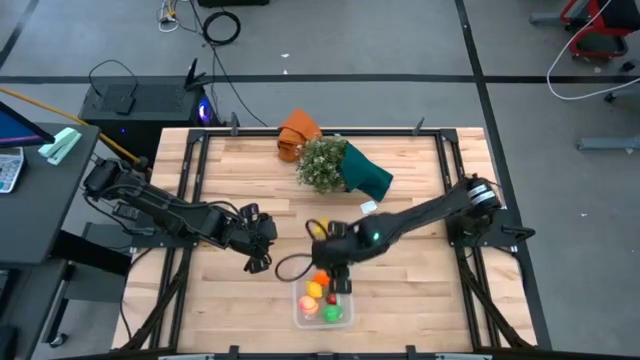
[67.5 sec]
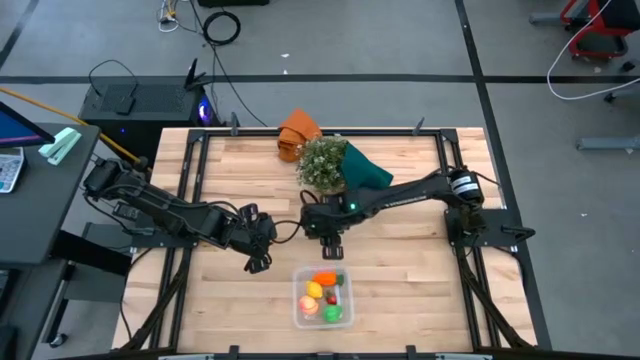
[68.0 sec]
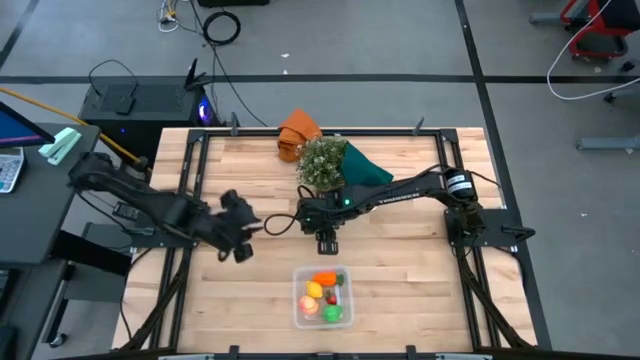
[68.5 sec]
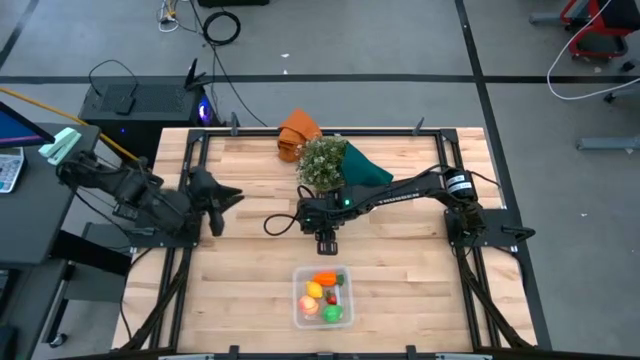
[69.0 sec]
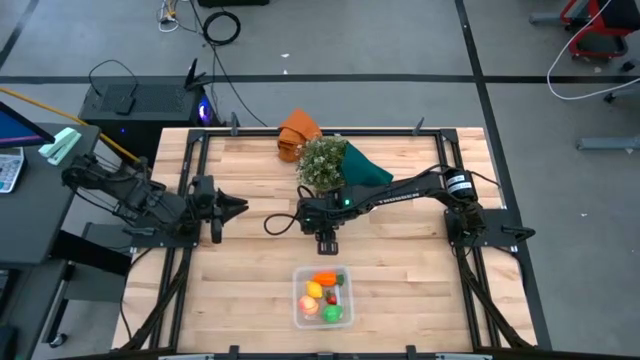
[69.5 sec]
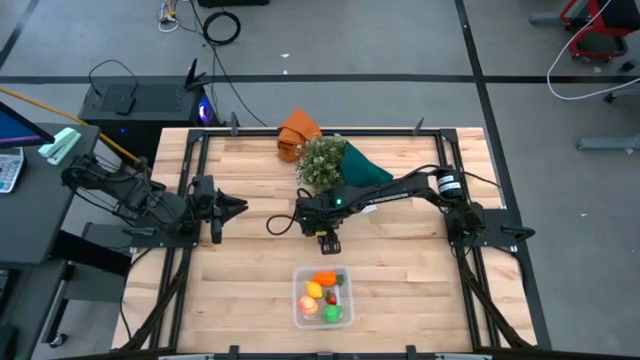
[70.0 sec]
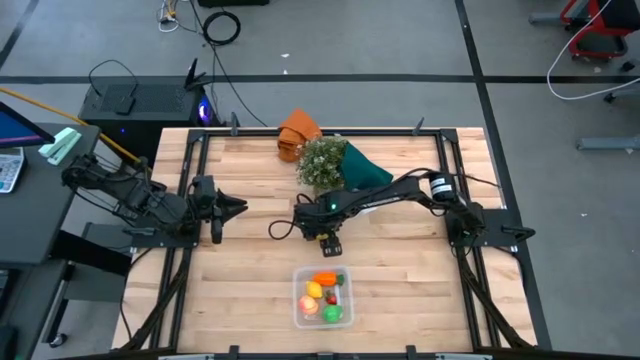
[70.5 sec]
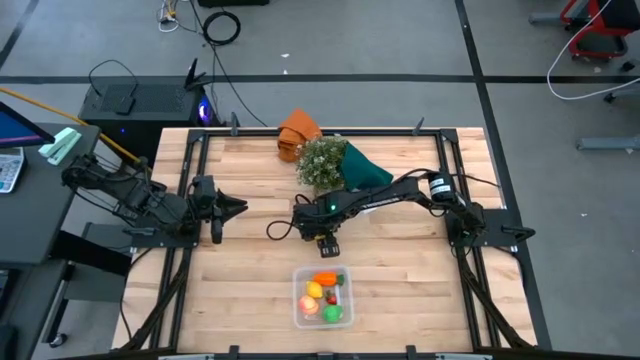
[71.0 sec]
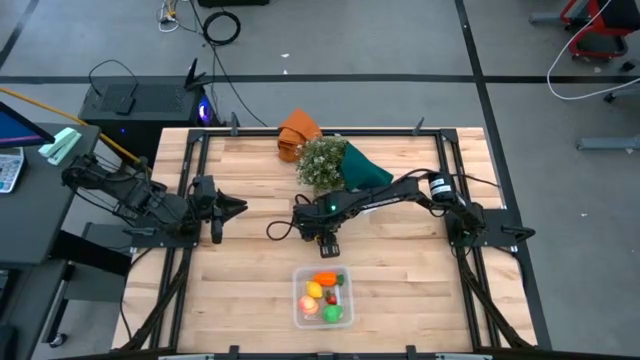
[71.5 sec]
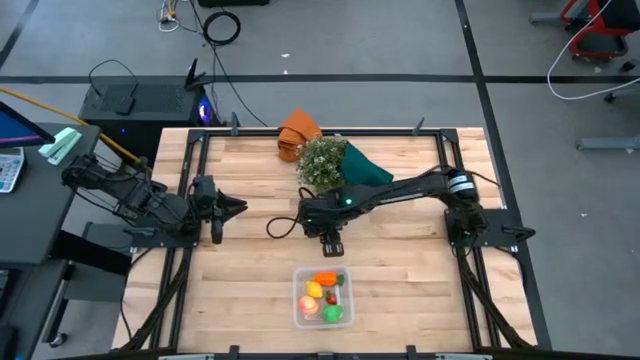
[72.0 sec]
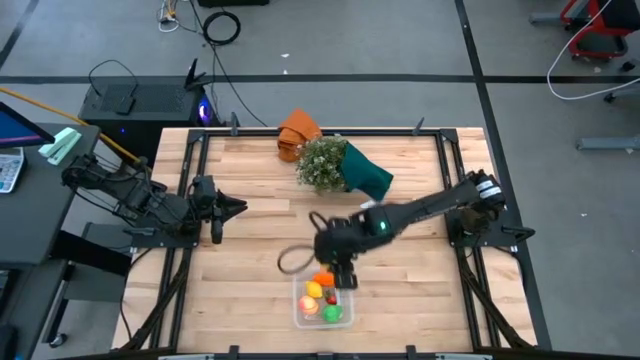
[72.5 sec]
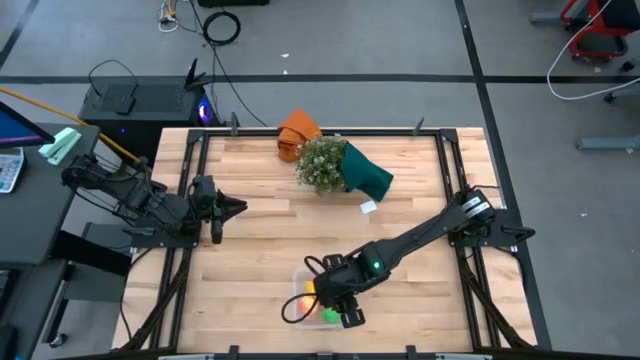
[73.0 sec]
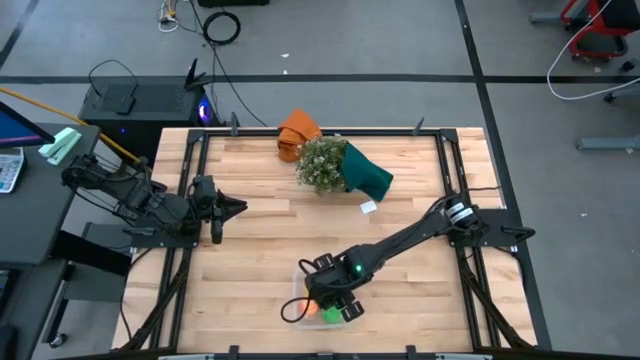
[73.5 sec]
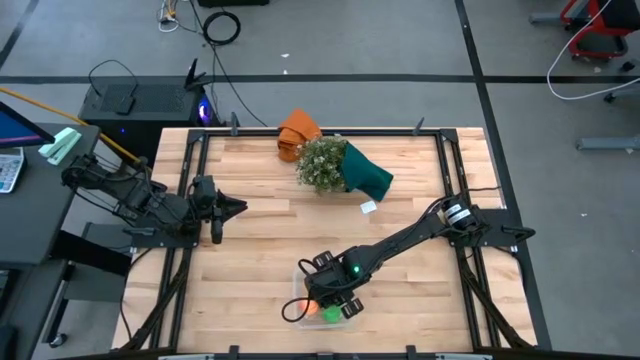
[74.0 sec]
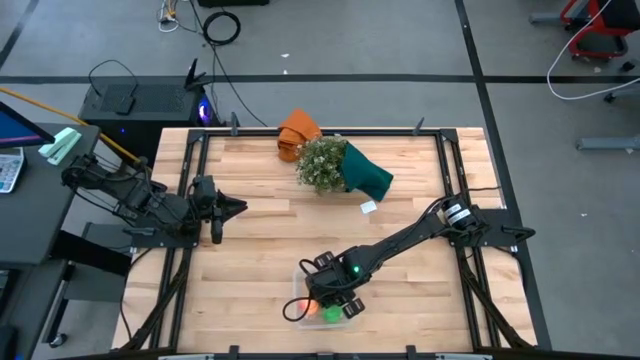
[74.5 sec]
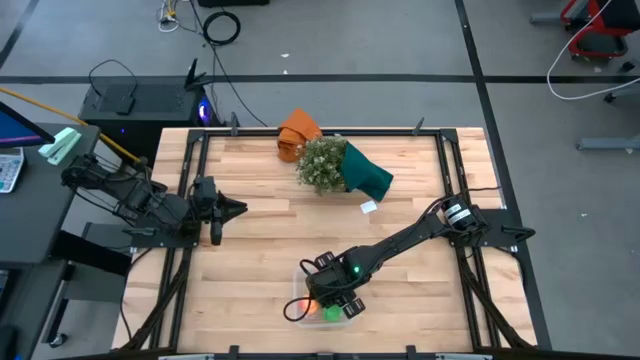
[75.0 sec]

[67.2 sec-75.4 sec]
Task: Pick and placing Produce into tupperware
Put the lemon into the transparent container

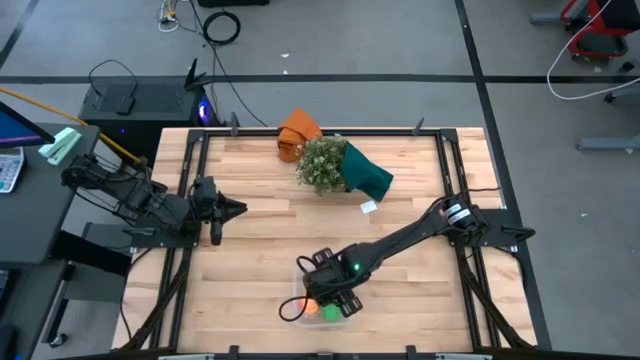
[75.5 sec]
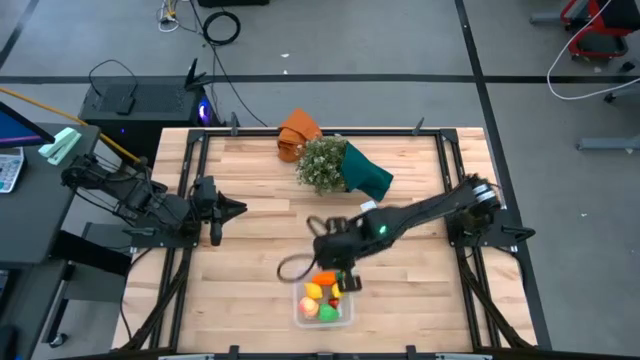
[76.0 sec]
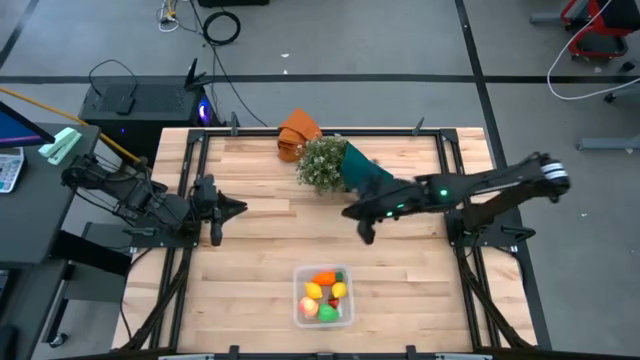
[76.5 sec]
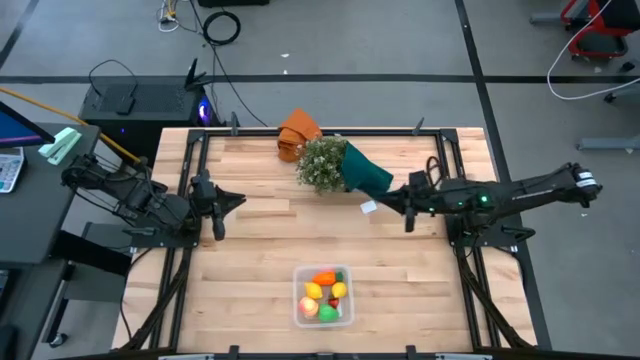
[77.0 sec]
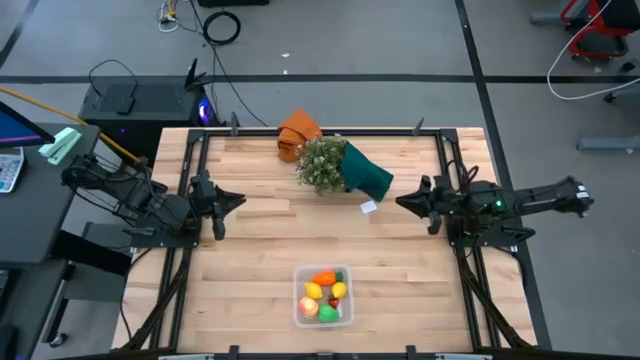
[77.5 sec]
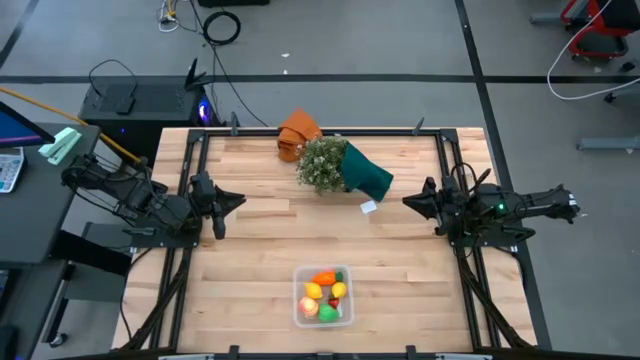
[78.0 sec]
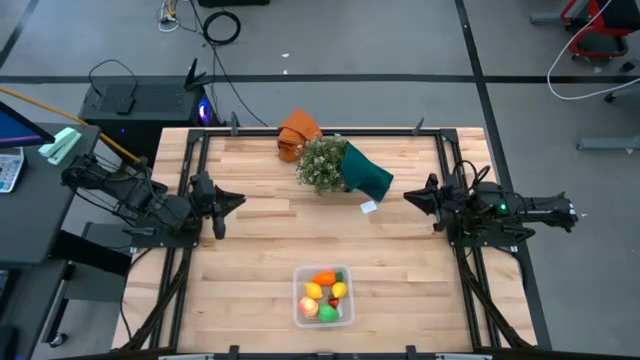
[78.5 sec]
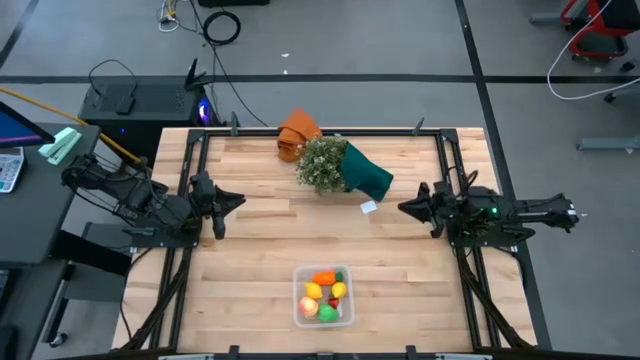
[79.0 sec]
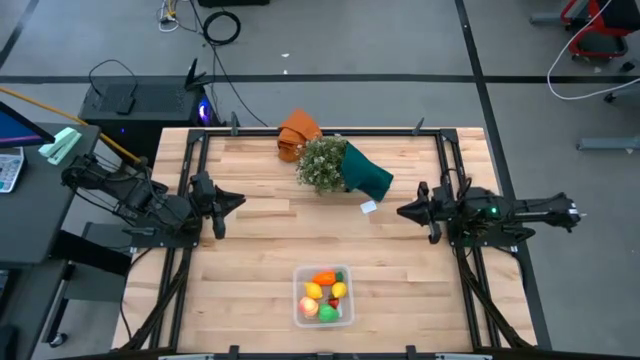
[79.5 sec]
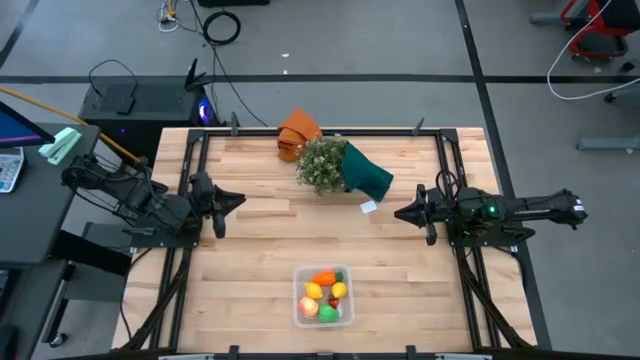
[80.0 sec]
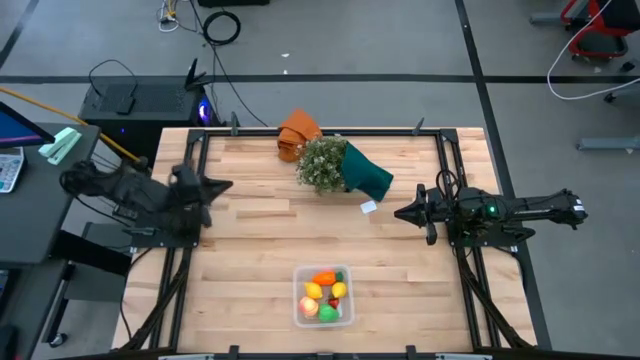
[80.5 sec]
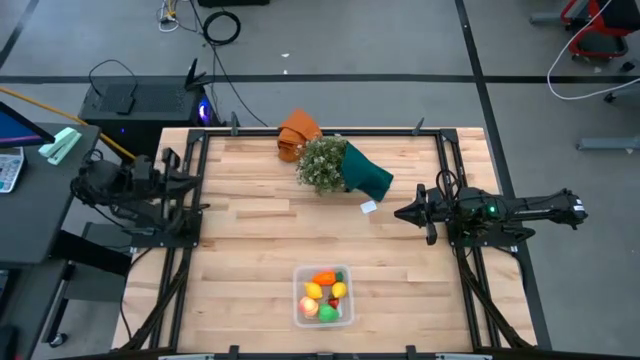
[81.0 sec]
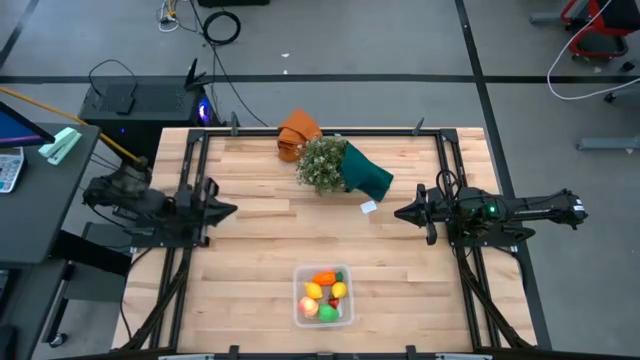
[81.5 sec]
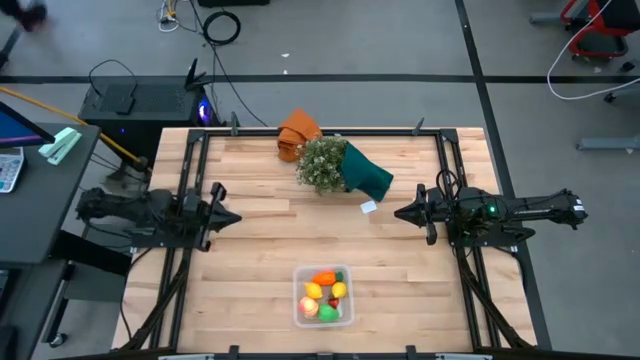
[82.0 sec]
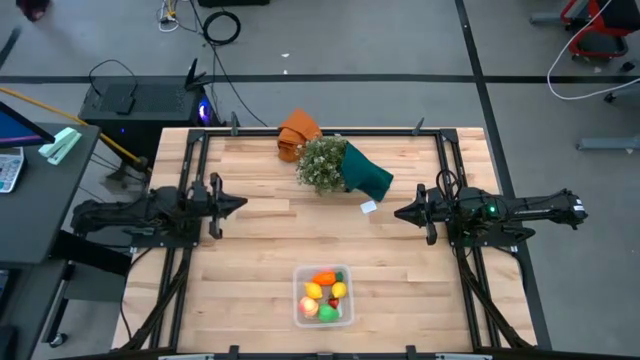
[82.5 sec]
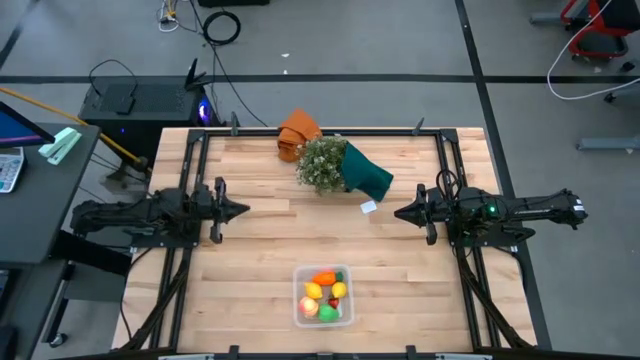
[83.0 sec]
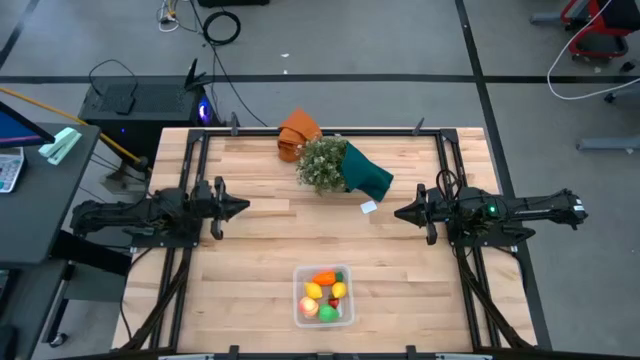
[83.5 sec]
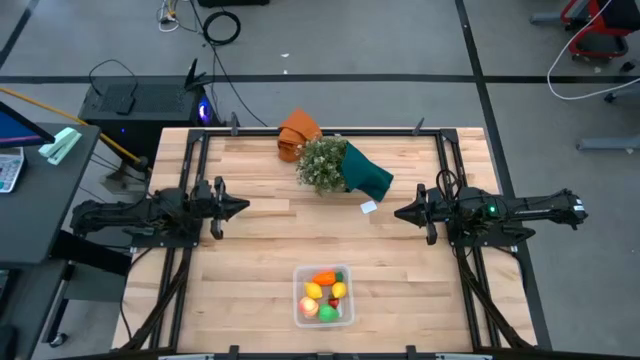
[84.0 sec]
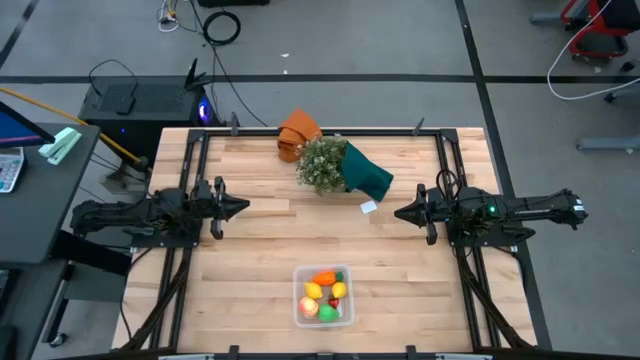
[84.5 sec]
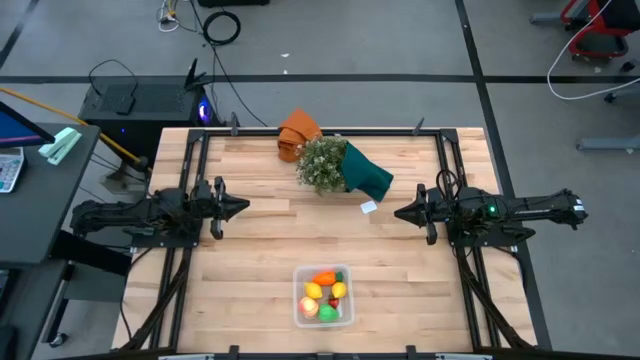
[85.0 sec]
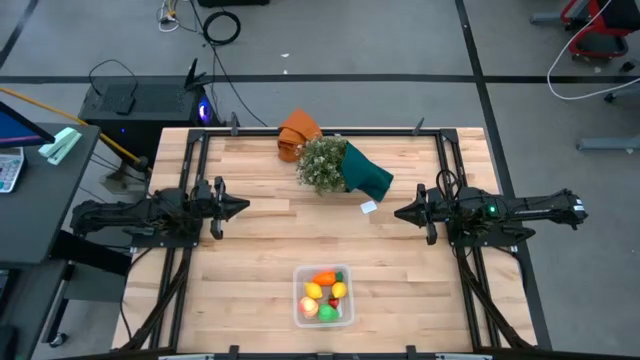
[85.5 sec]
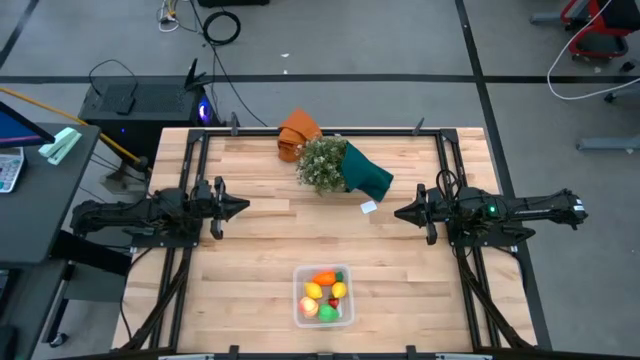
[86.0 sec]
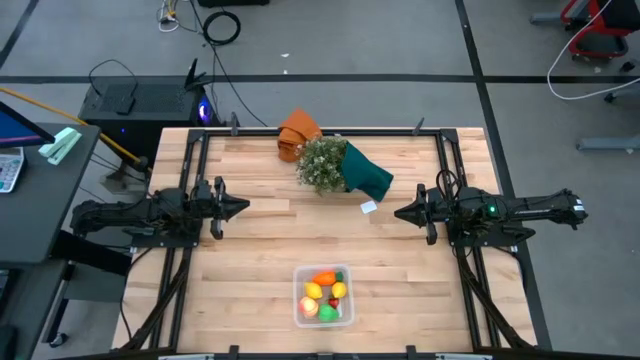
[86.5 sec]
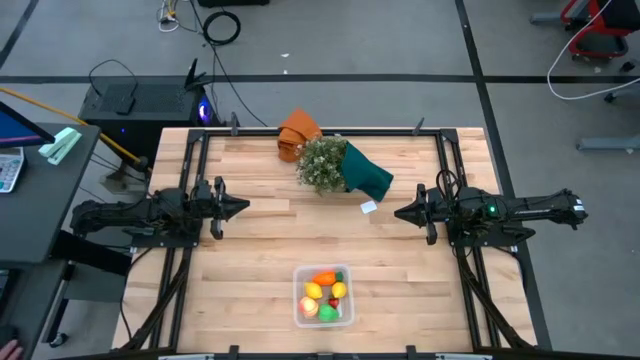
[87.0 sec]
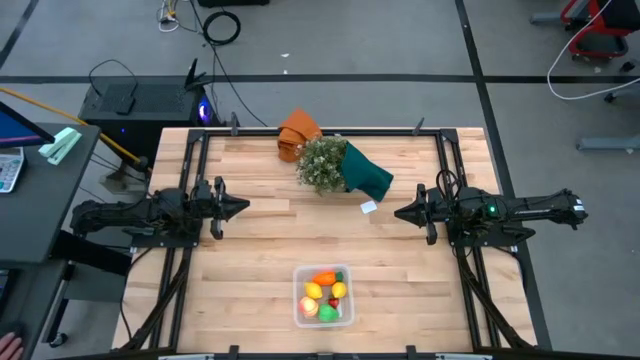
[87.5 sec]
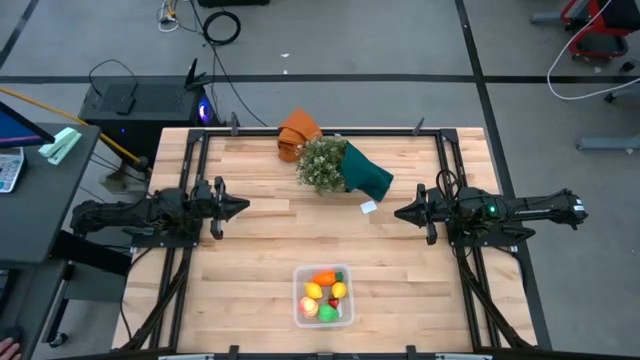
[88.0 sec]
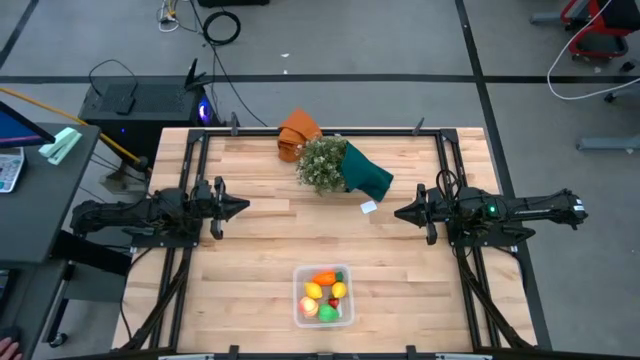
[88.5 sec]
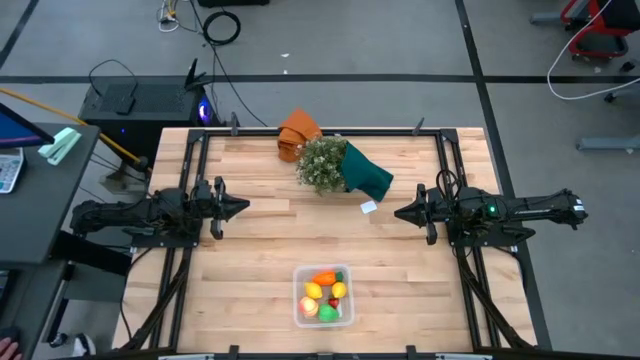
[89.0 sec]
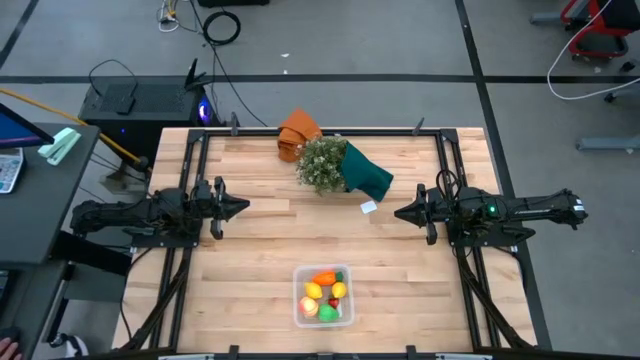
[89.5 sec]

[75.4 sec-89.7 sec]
Return to Home Position
